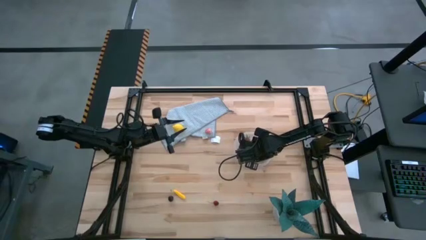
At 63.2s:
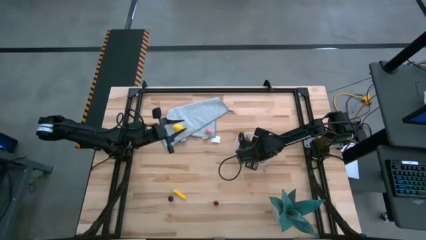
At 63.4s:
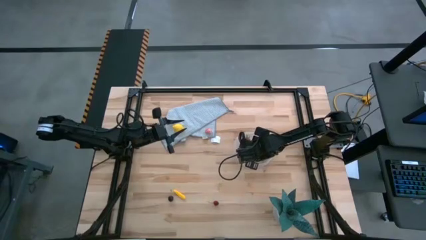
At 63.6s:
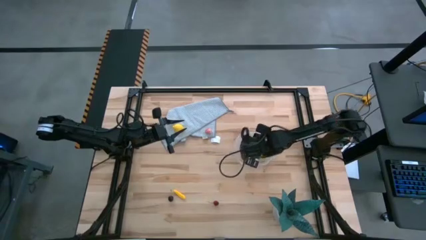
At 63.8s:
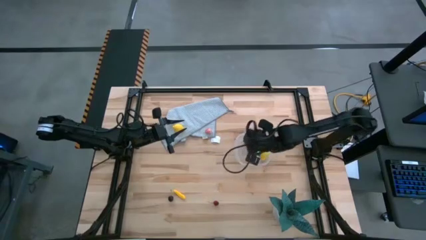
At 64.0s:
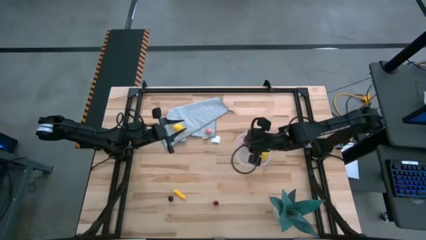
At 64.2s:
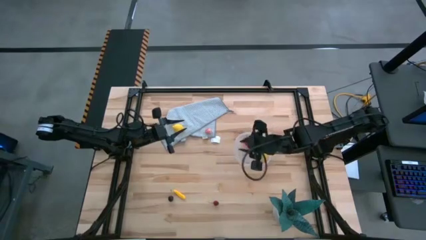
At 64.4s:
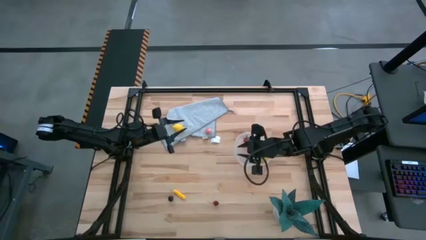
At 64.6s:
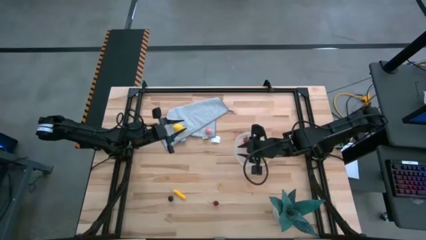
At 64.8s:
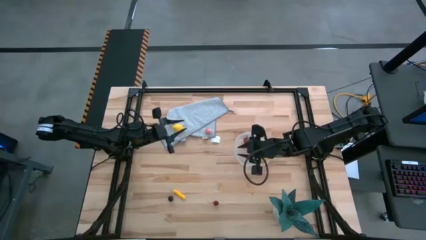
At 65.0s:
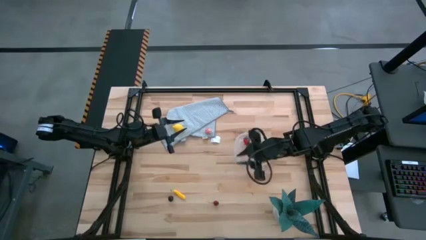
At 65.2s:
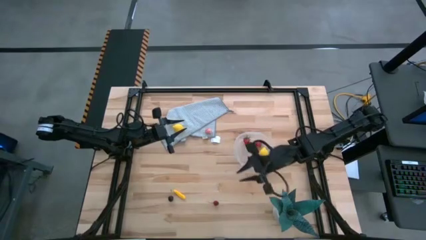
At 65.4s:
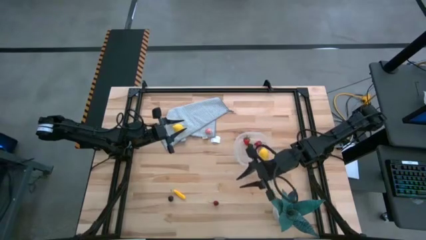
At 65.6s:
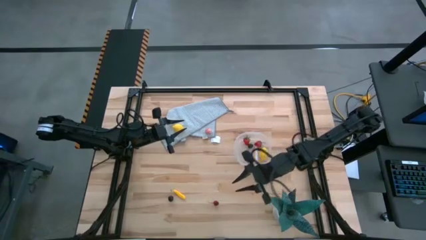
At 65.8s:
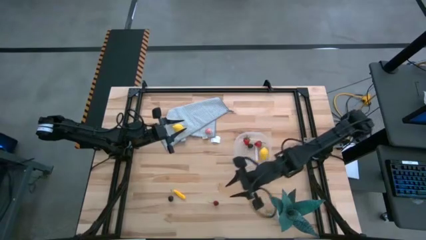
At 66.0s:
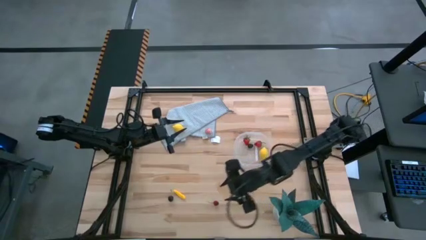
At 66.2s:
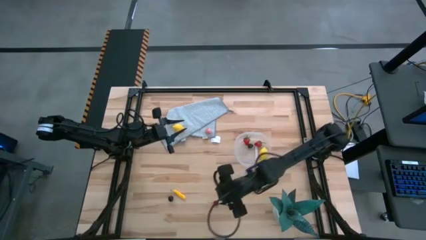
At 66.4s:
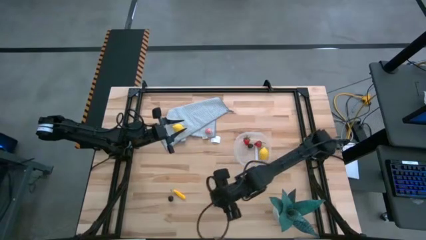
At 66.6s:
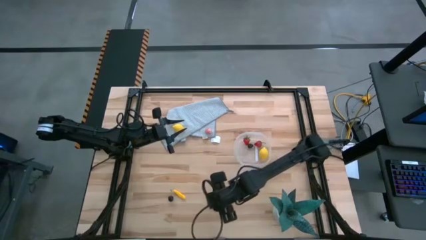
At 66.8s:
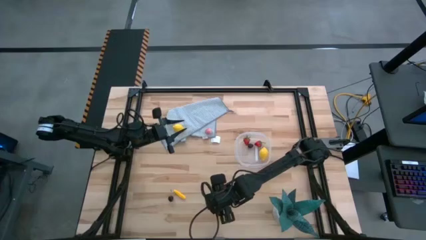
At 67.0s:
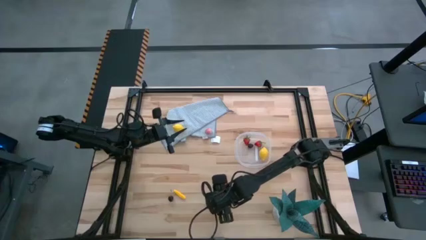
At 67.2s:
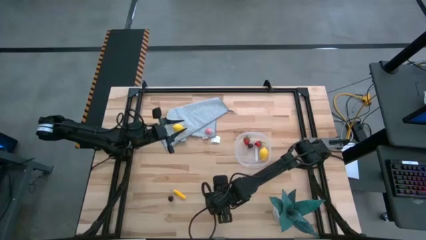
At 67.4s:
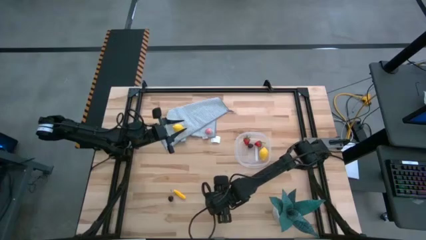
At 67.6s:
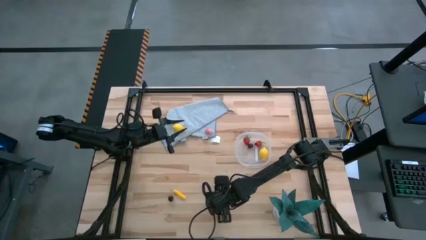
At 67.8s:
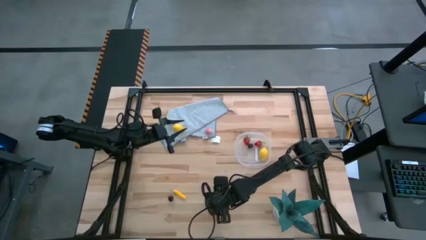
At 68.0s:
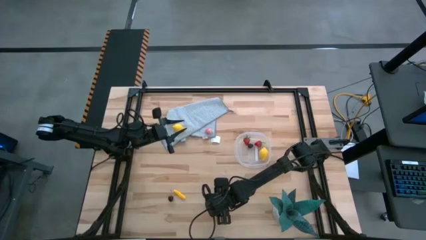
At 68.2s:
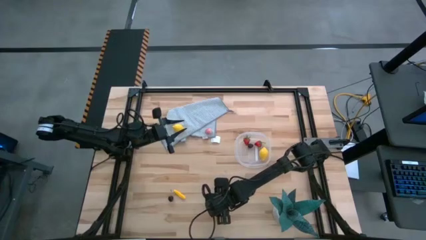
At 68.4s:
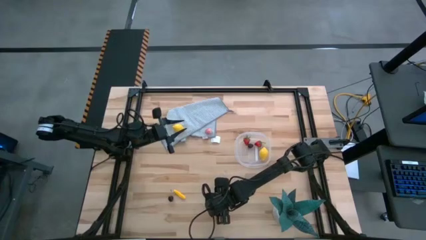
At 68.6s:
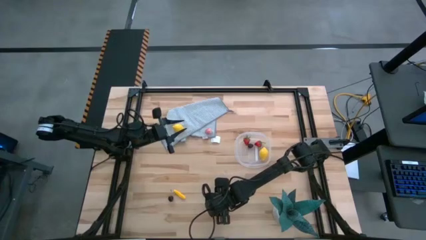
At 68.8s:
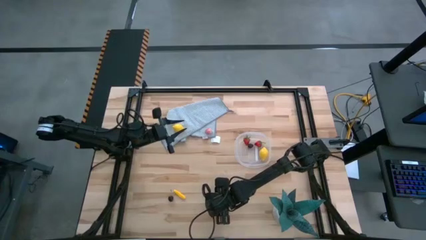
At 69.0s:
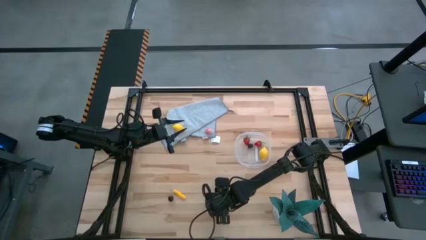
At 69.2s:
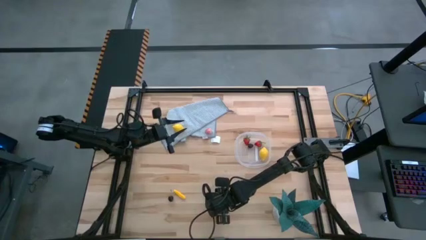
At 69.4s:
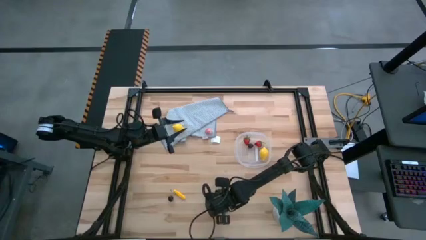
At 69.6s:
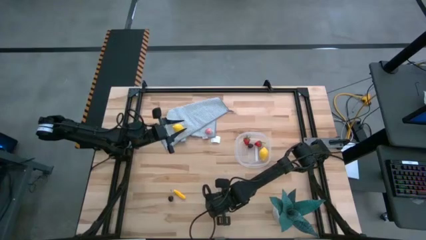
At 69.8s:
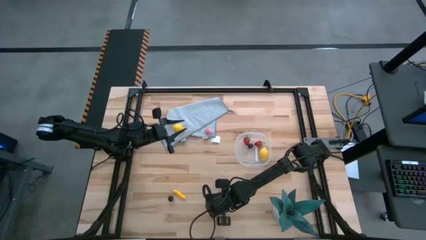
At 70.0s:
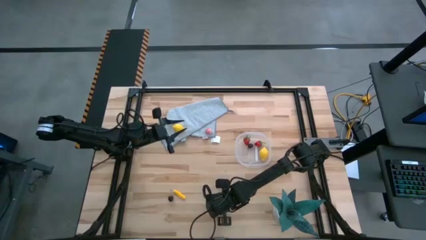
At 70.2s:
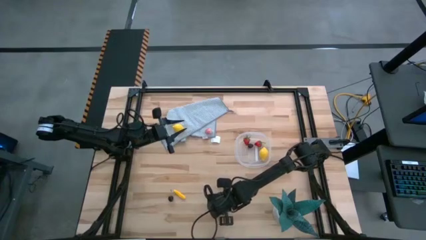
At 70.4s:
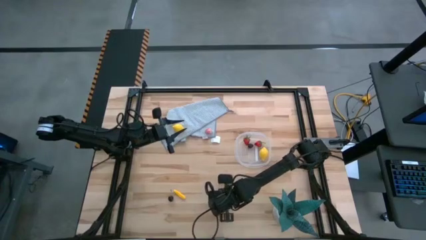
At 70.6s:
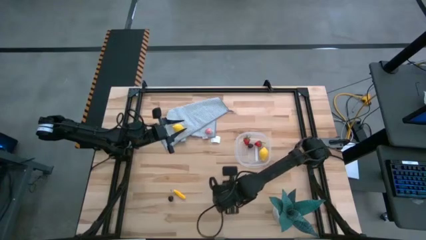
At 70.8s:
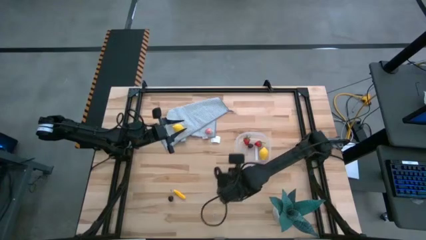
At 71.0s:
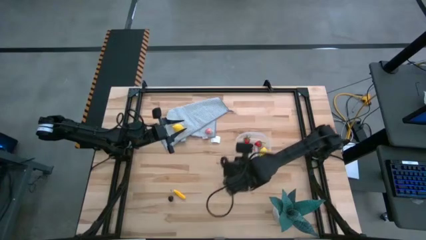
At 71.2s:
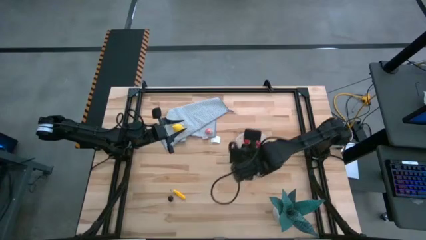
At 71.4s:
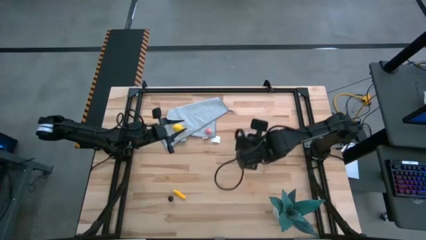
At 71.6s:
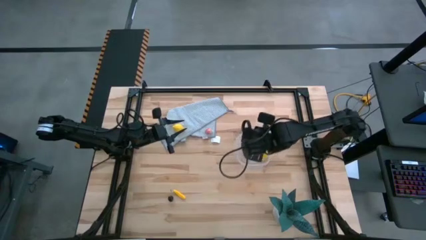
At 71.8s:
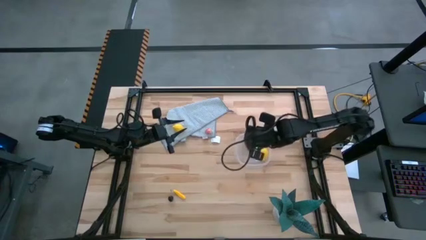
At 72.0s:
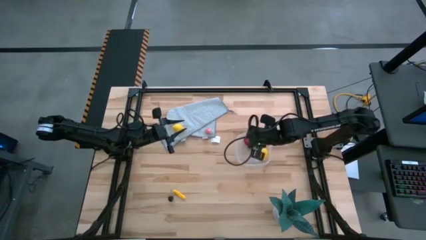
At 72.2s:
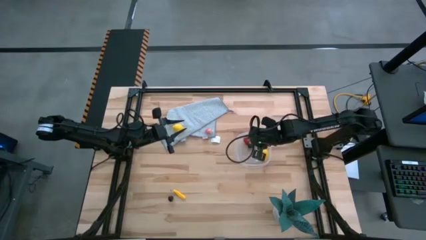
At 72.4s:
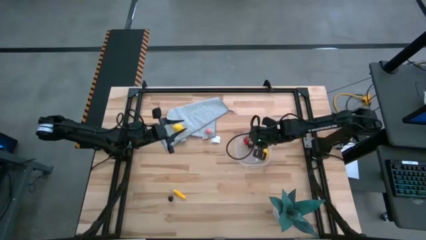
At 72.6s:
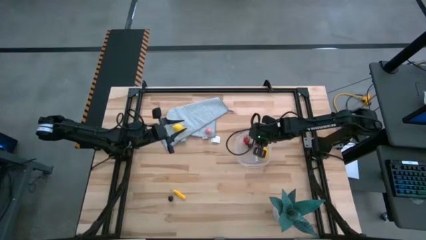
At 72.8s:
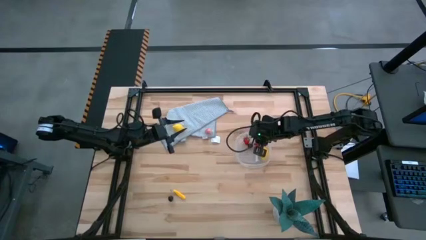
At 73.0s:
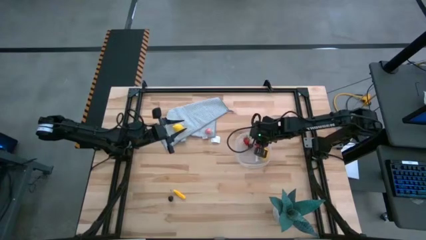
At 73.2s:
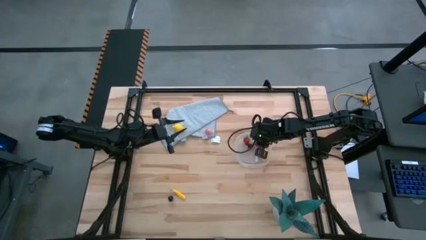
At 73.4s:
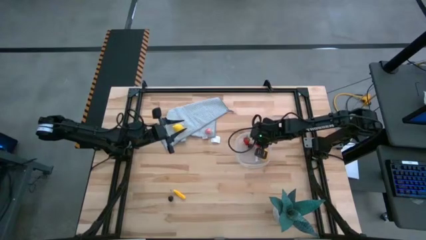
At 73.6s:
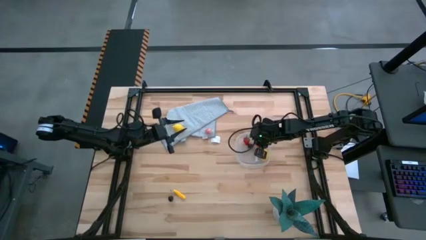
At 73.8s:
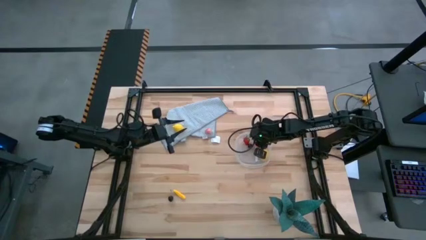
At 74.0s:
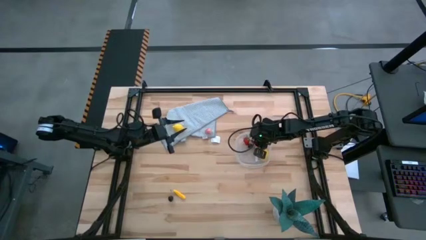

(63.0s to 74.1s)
Task: Pick and placing Produce into tupperware
Put the right cherry into the transparent container
